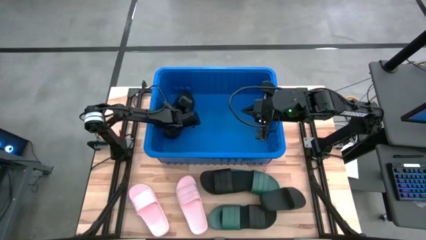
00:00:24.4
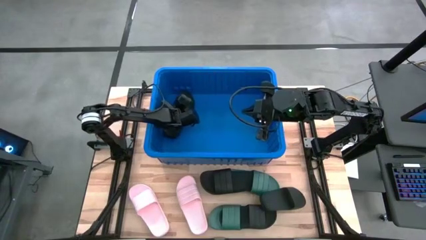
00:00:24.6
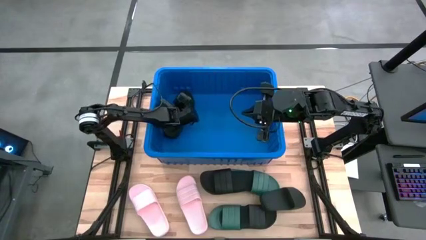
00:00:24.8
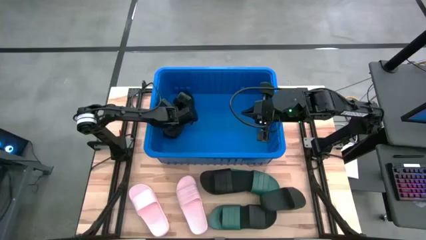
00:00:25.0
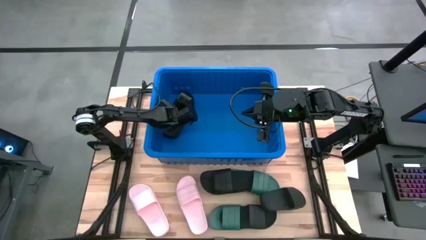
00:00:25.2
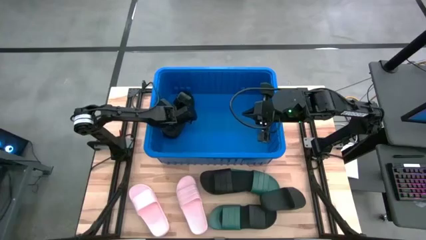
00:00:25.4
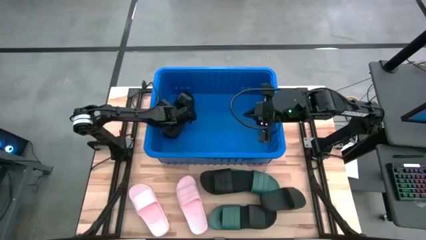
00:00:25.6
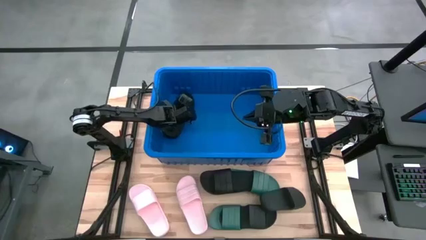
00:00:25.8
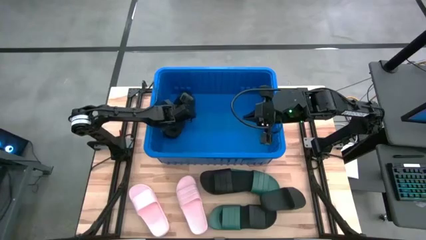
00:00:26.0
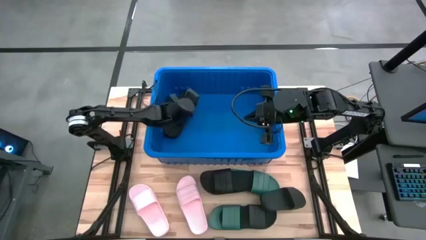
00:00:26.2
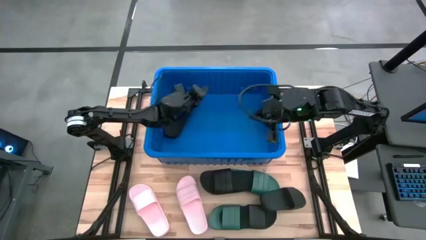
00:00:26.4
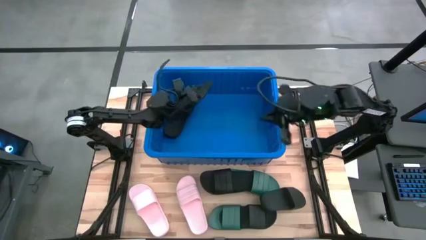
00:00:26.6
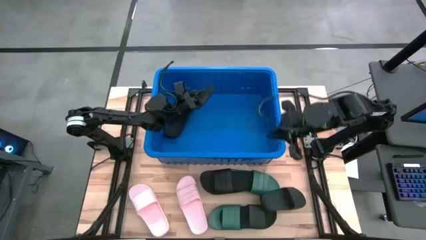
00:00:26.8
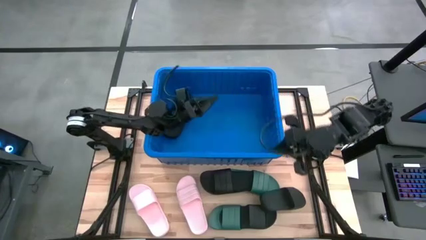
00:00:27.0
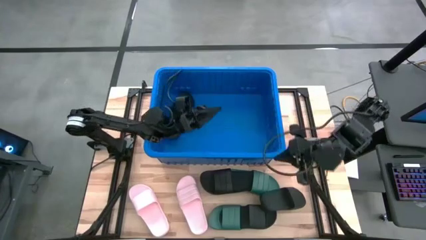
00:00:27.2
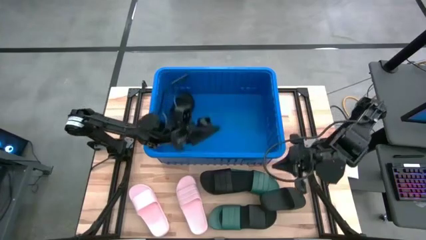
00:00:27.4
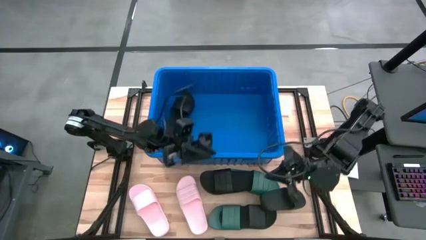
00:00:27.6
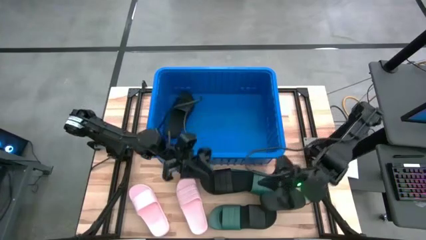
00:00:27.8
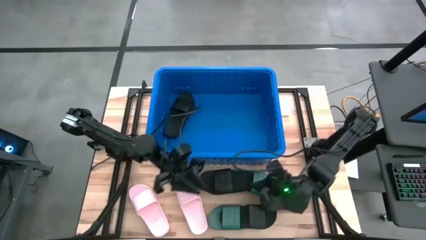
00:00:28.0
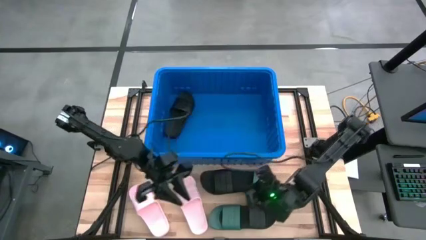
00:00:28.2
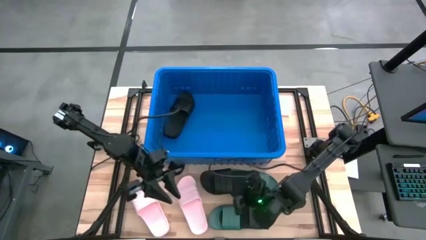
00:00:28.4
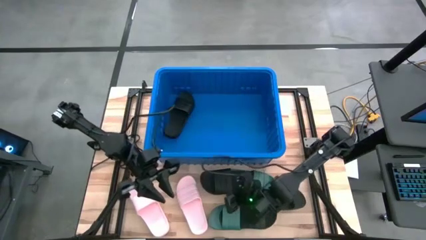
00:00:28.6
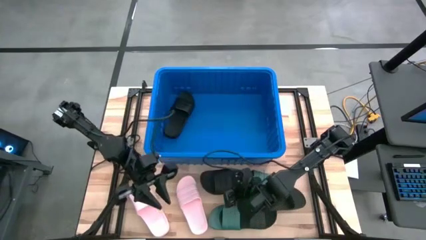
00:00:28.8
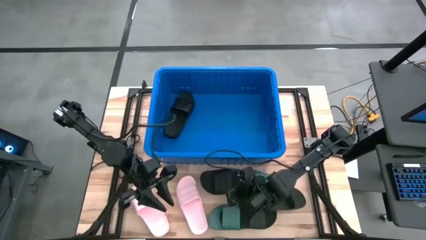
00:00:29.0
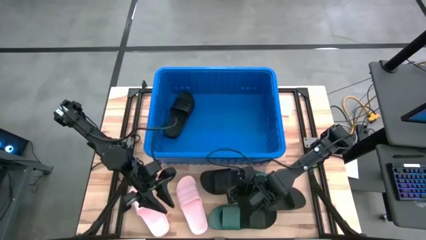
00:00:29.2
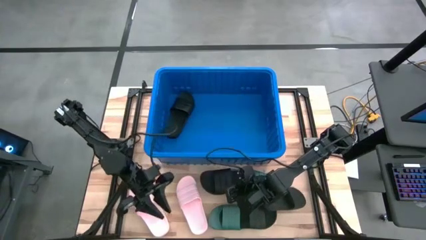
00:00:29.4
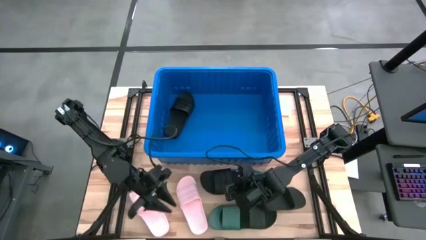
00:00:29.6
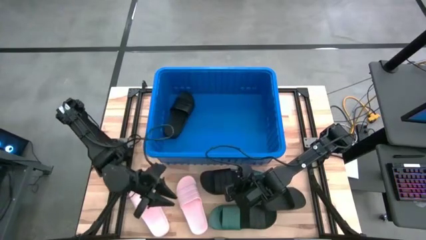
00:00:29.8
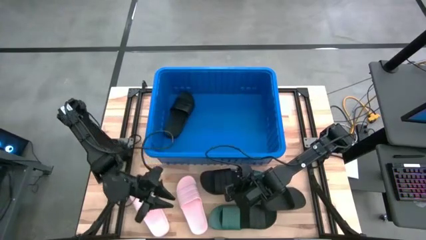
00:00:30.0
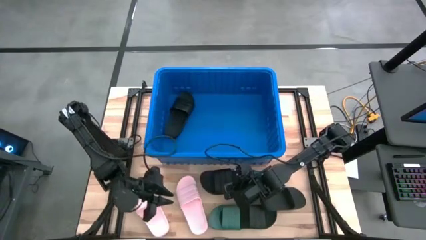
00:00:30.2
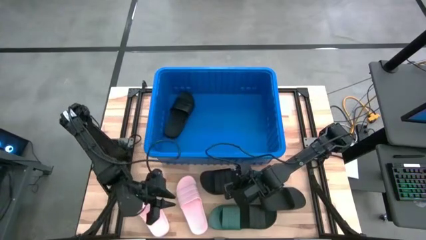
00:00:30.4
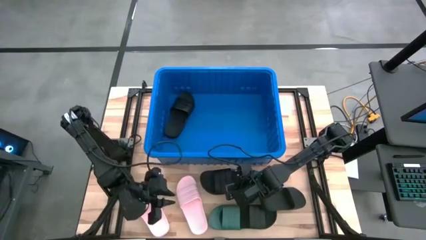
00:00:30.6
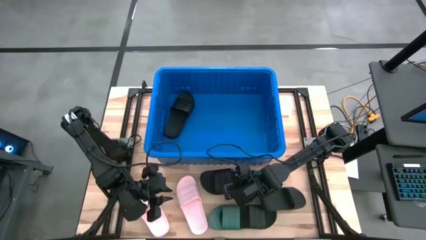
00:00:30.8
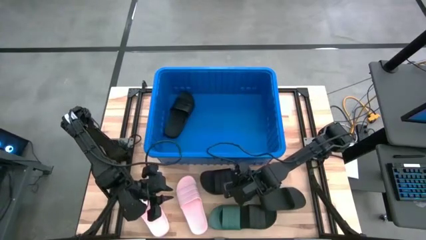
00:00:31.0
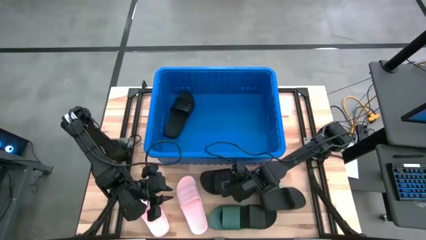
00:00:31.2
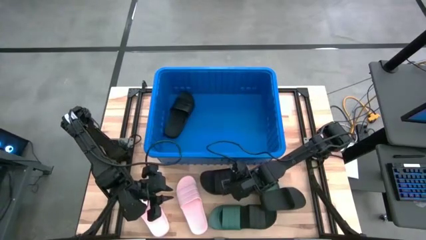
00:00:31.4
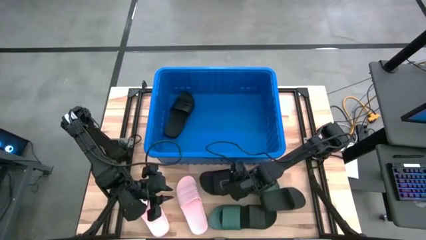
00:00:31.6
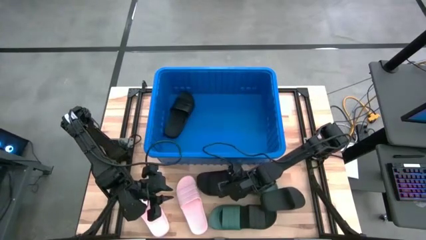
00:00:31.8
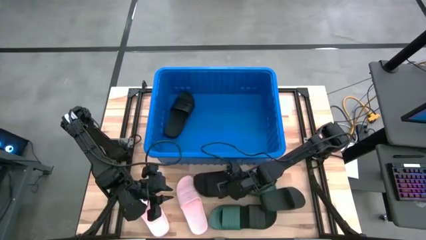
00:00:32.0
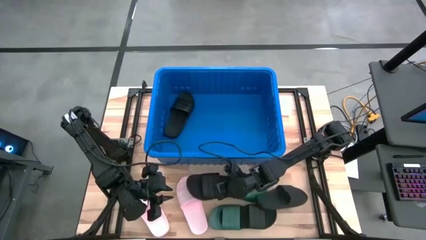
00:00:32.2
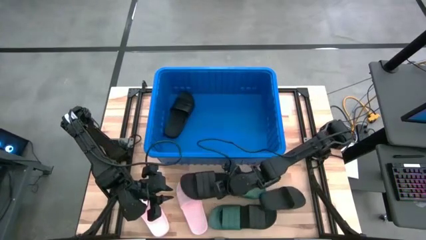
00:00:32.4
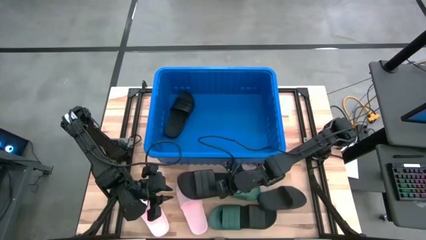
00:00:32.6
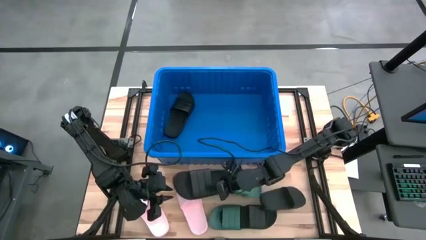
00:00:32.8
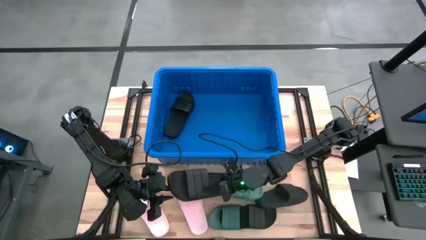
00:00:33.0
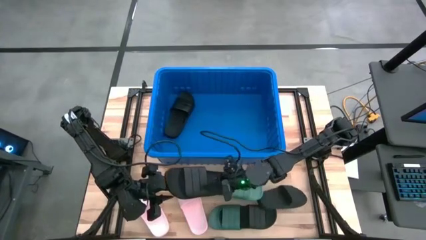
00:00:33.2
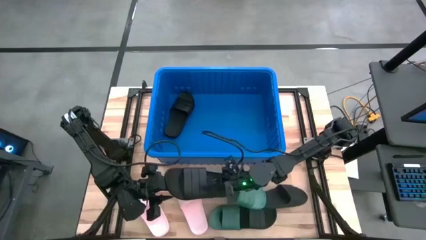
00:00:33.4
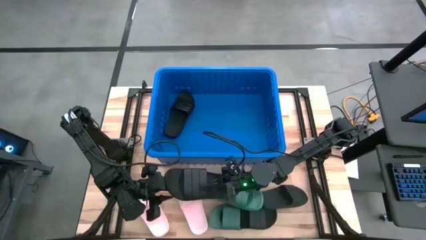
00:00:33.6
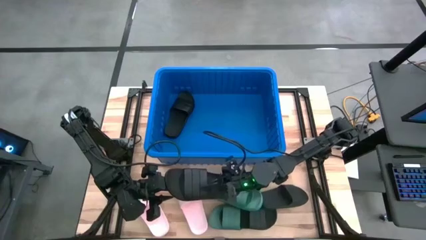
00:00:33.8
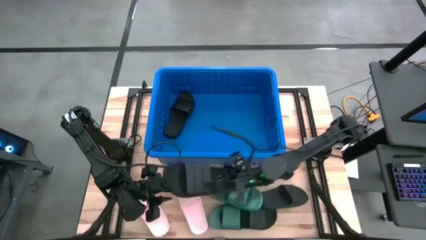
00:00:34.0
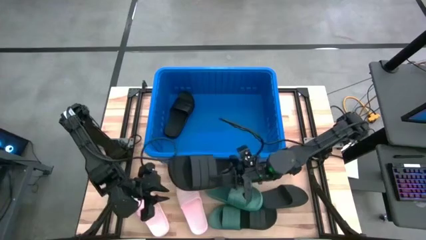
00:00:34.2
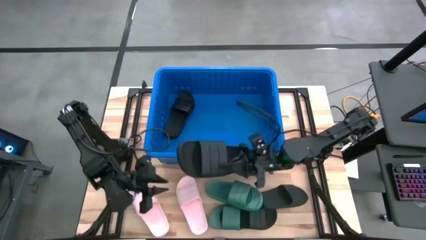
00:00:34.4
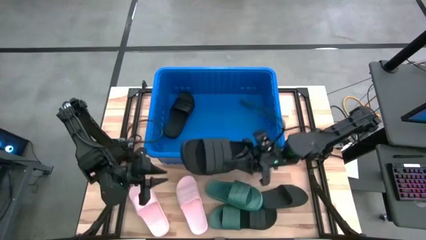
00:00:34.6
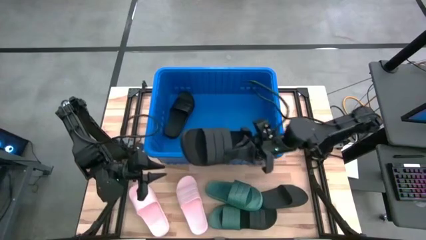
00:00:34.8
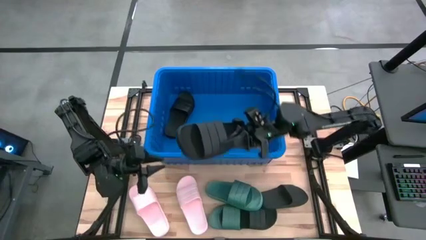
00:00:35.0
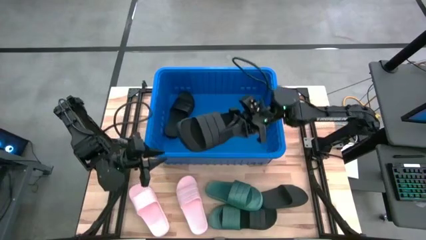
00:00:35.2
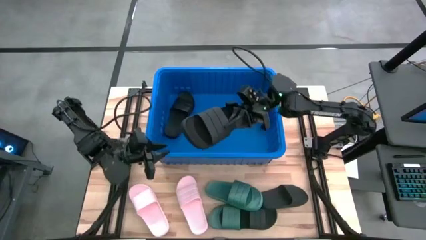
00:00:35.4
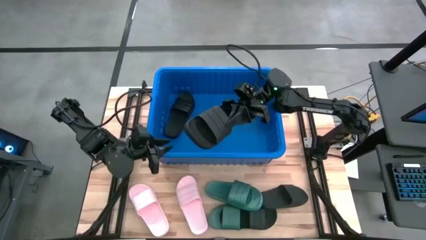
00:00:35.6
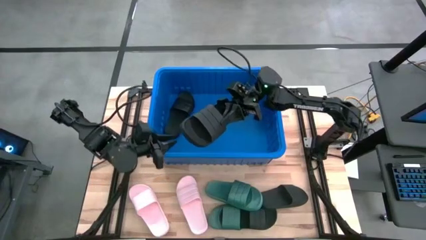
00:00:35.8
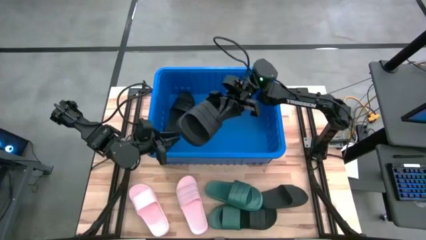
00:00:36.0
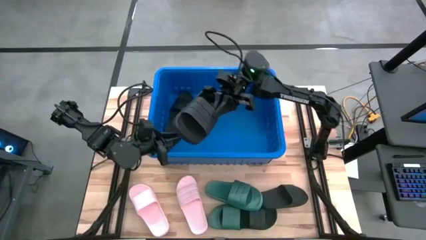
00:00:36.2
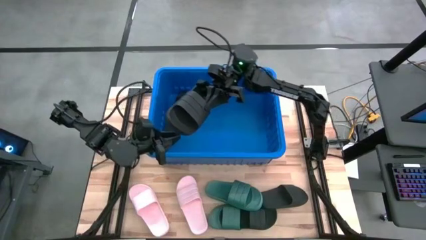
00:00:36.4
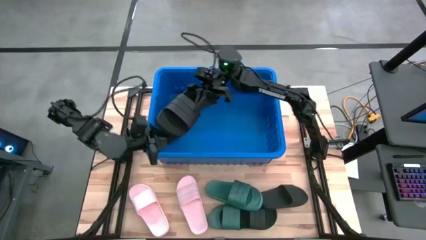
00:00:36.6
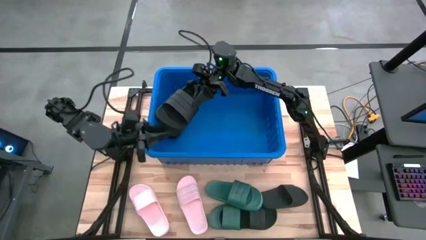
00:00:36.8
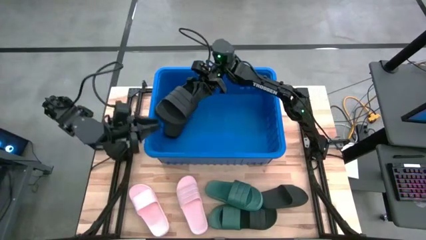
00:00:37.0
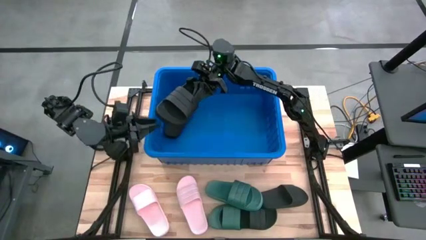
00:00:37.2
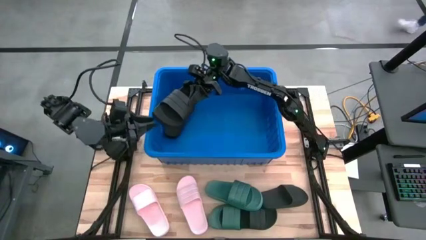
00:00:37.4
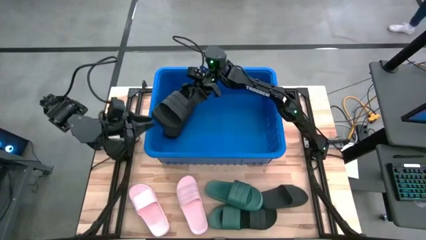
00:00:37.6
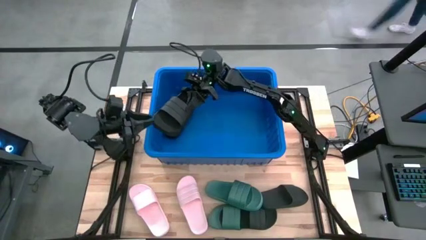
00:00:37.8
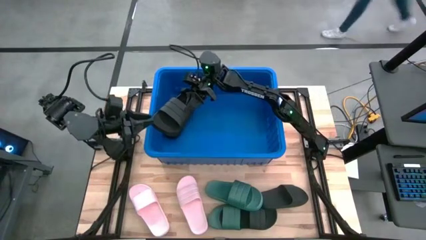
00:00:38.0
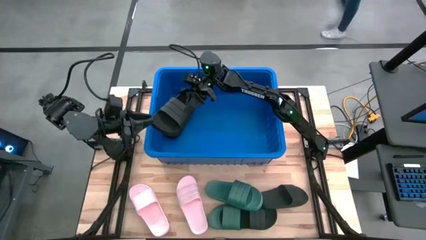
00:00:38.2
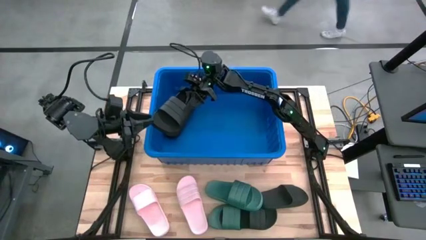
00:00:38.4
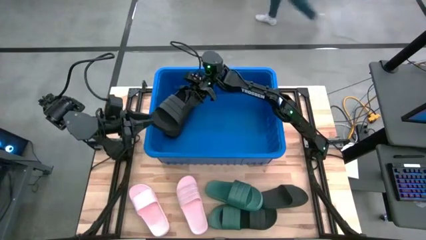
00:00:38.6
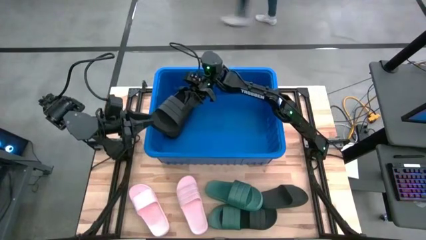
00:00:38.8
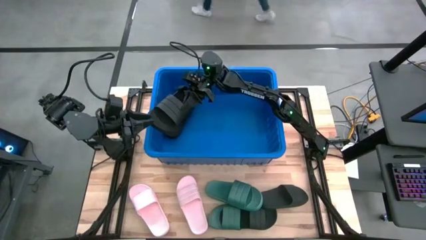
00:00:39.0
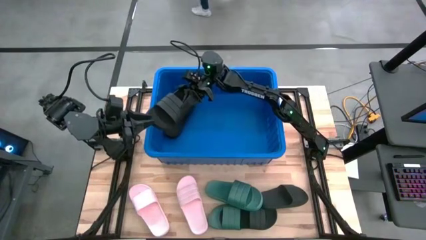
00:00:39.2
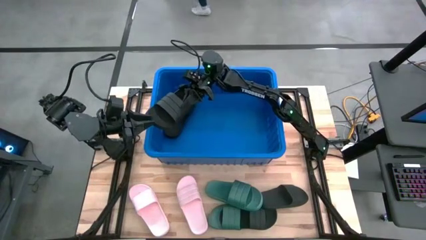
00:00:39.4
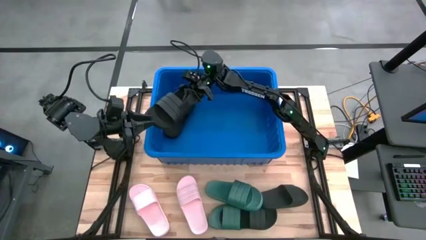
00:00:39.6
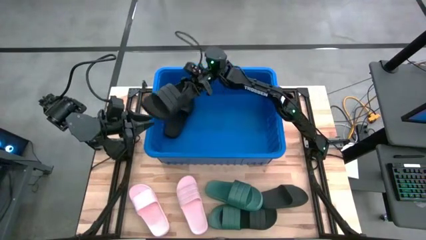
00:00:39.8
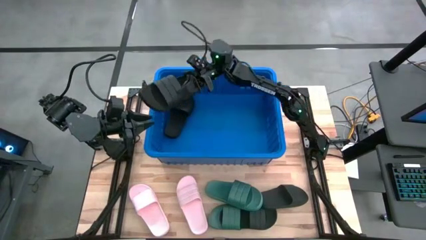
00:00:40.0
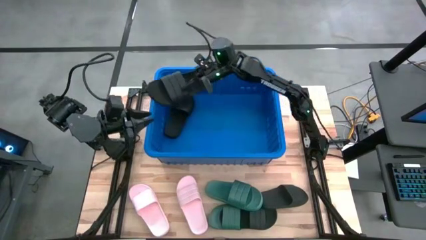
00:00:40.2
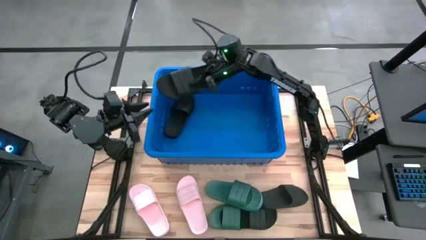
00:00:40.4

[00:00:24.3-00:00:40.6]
Task: Pick and place slides into bin
Put the black slipper into the blue bin
